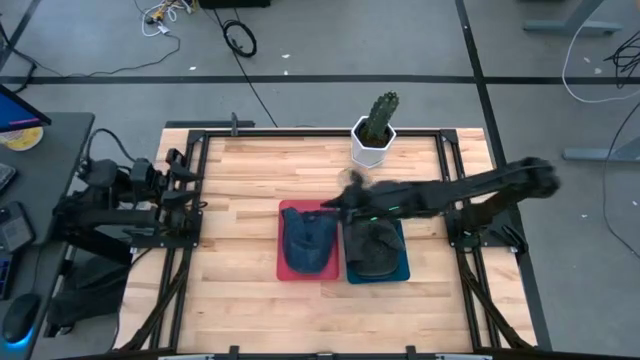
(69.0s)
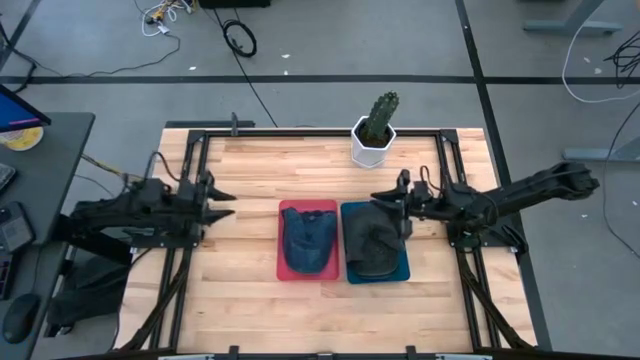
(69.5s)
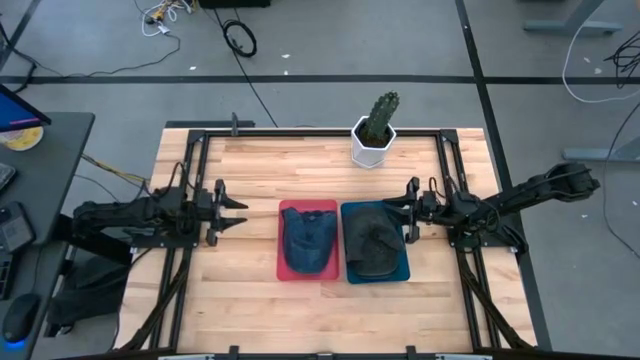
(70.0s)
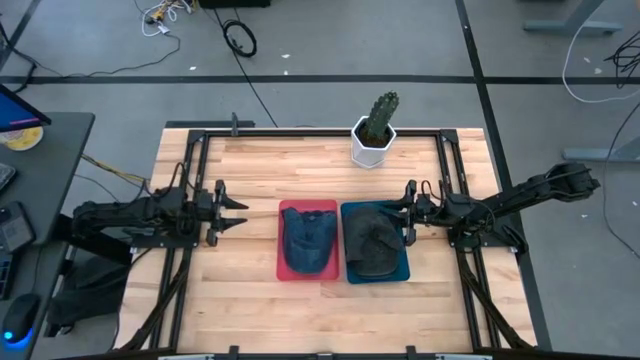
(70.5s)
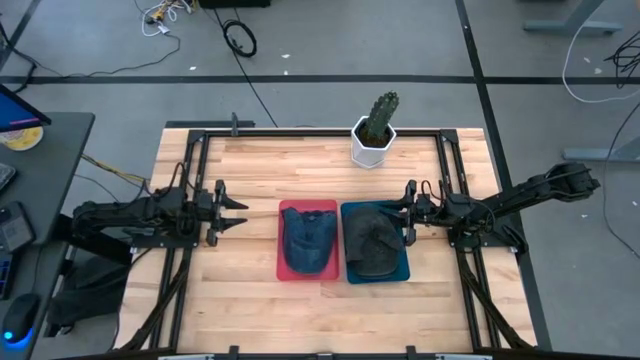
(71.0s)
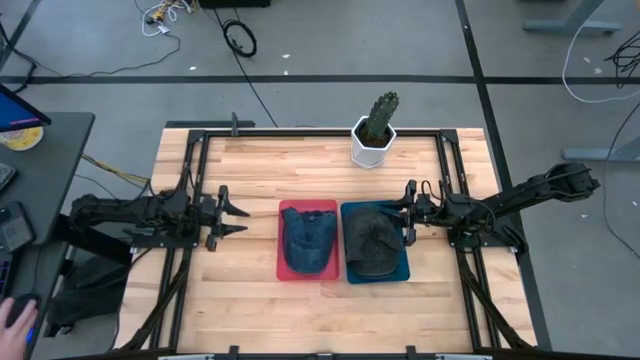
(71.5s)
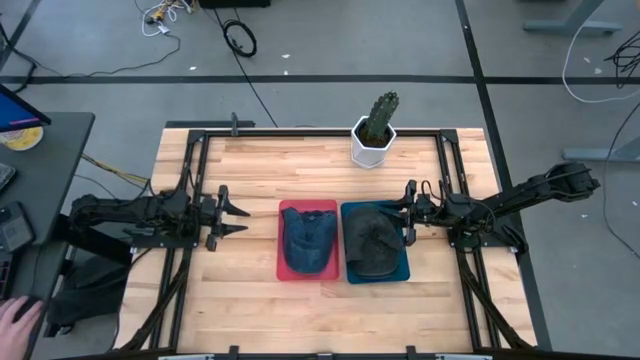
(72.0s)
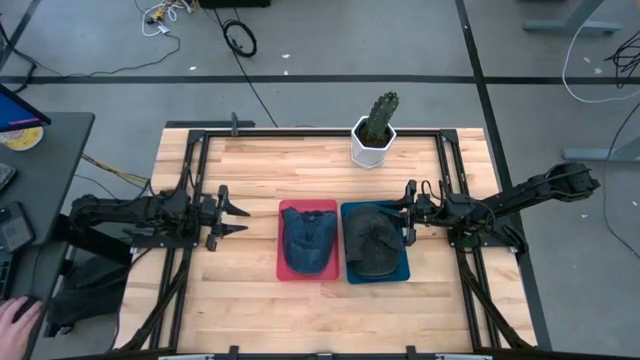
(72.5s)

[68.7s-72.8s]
Task: Pick & Place hat
Return to Home Position

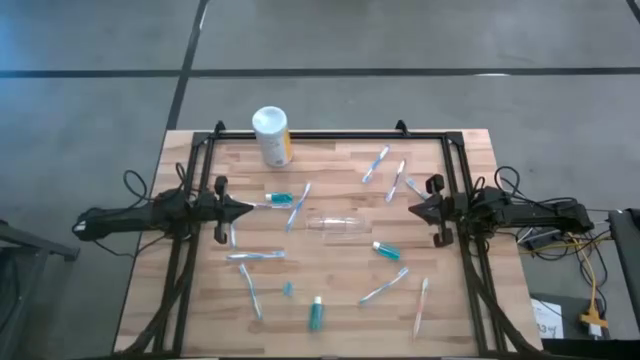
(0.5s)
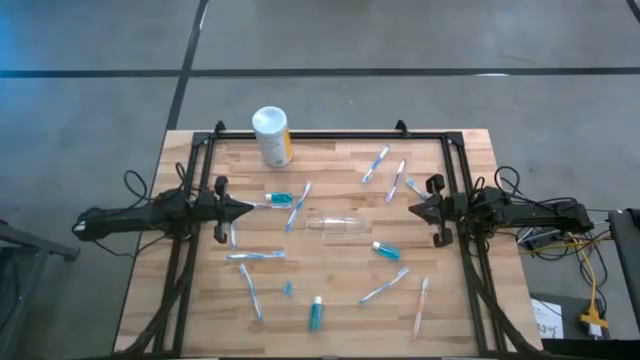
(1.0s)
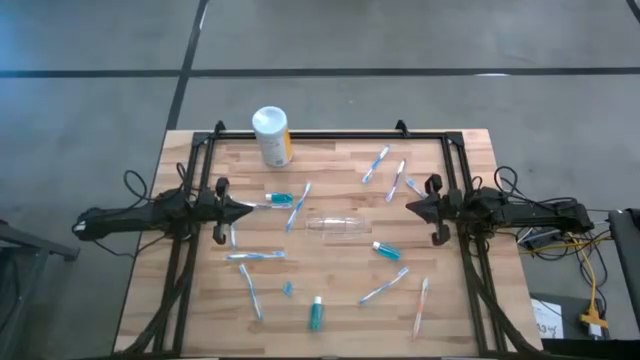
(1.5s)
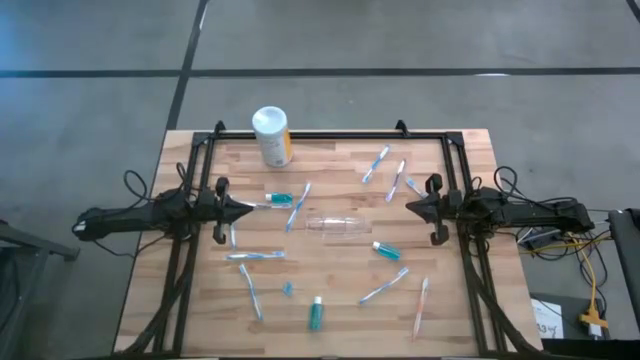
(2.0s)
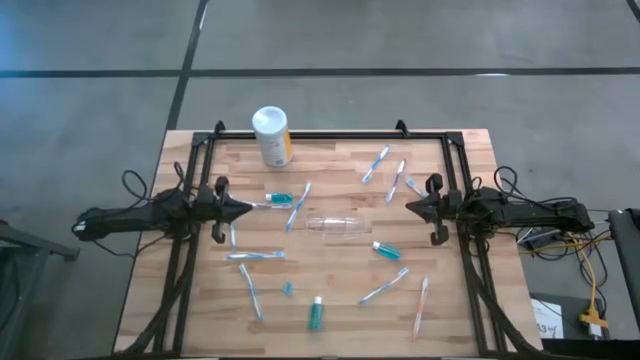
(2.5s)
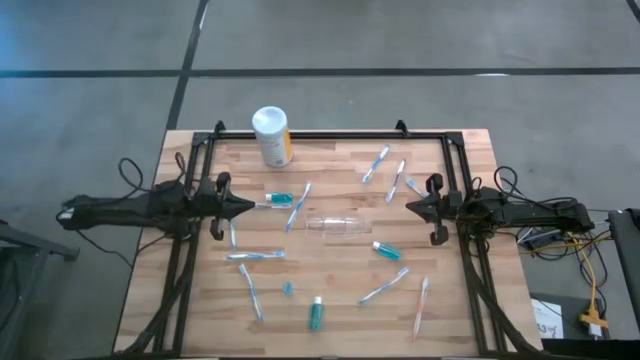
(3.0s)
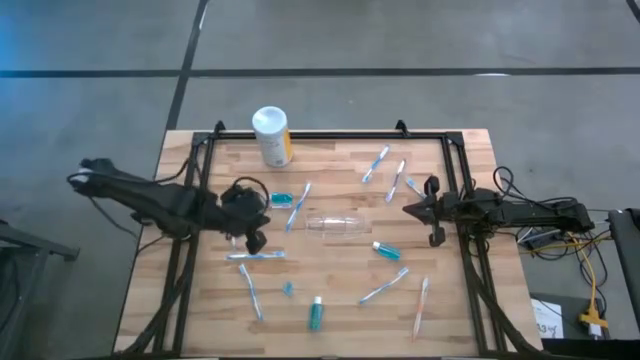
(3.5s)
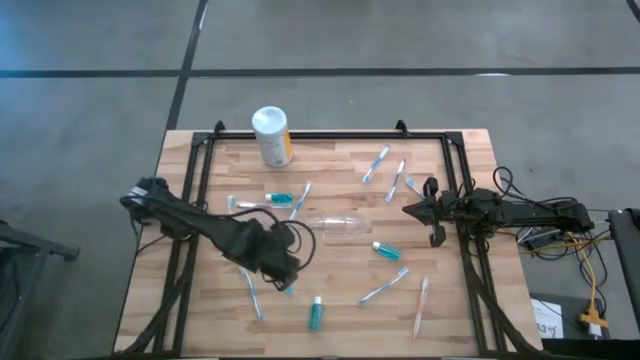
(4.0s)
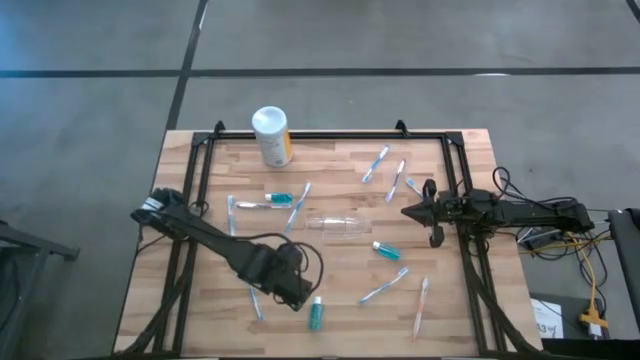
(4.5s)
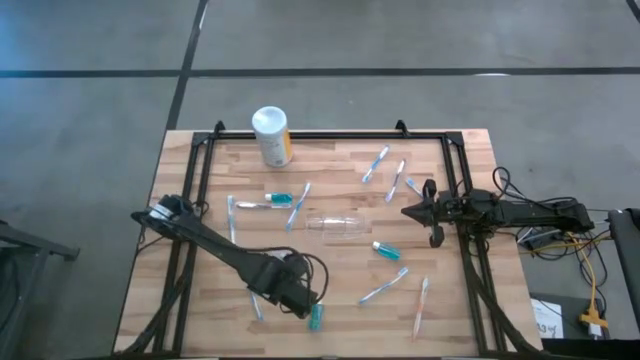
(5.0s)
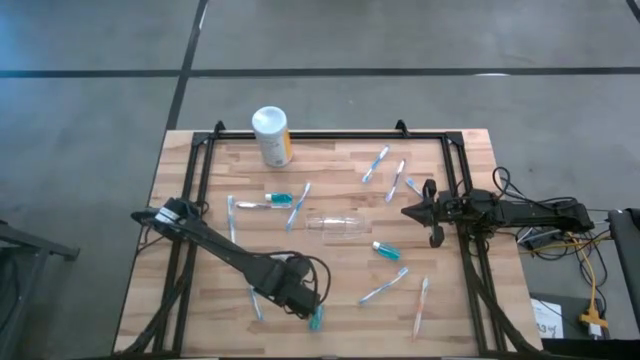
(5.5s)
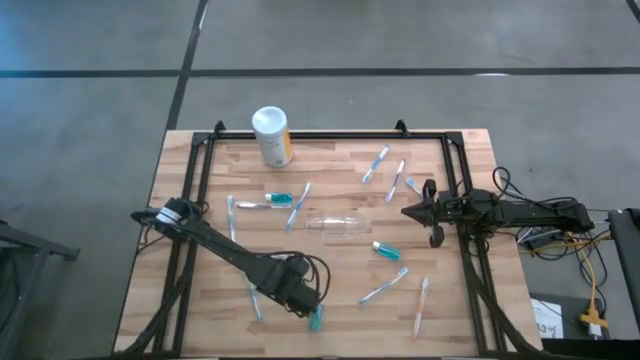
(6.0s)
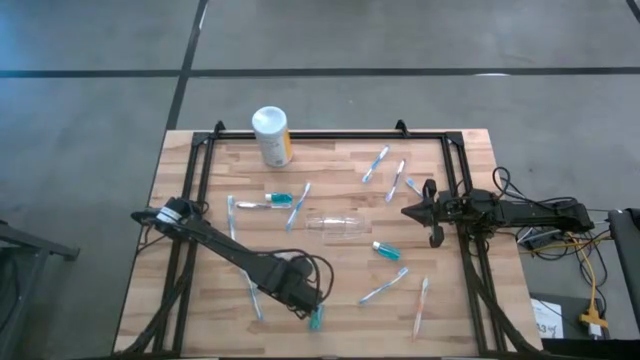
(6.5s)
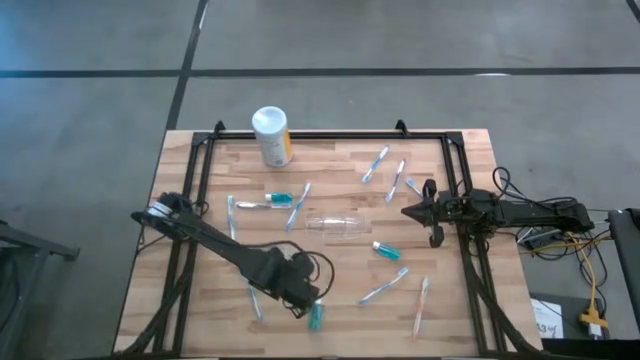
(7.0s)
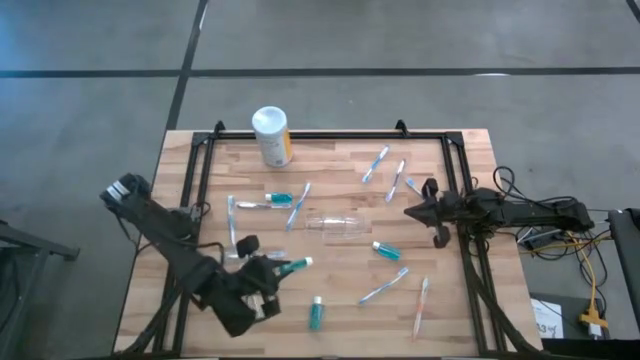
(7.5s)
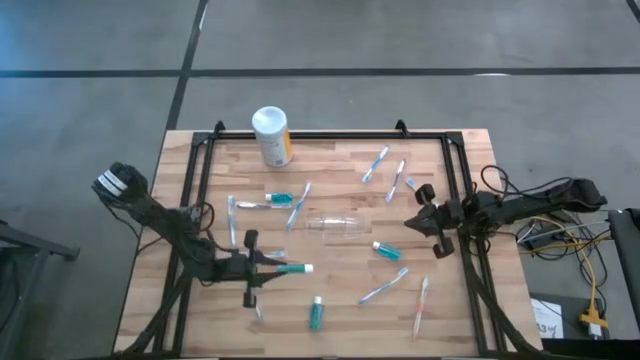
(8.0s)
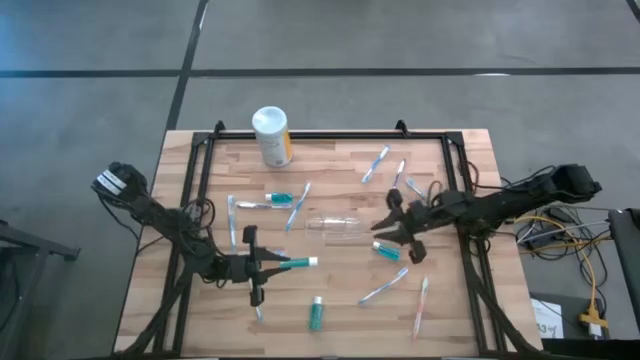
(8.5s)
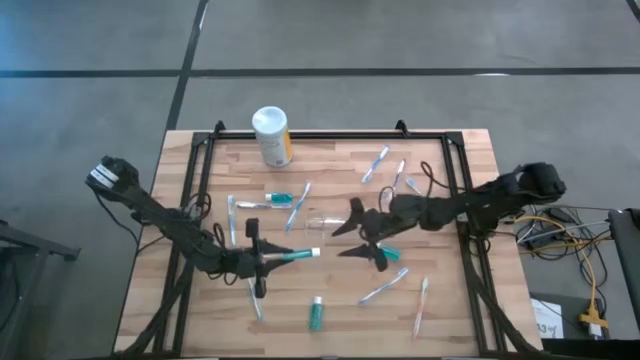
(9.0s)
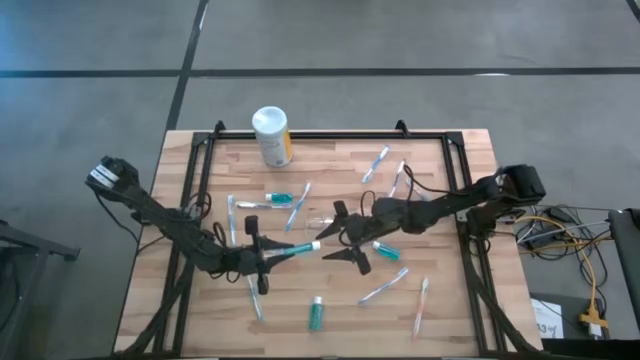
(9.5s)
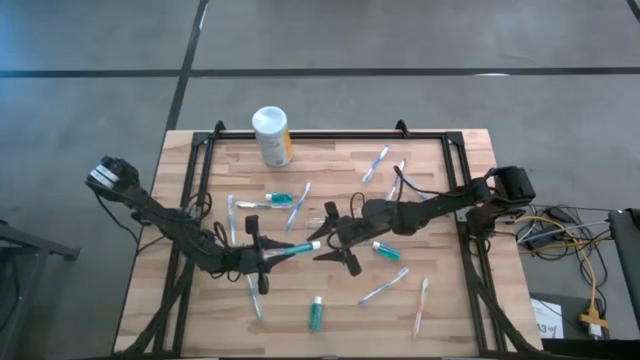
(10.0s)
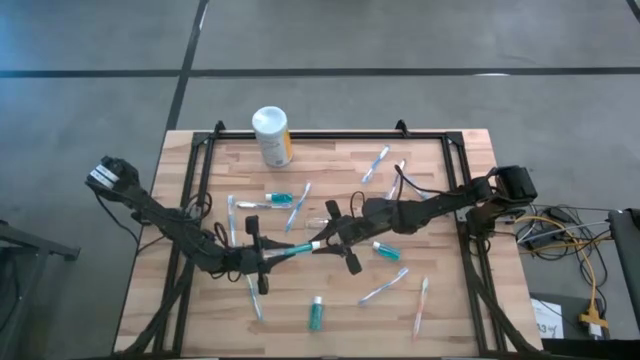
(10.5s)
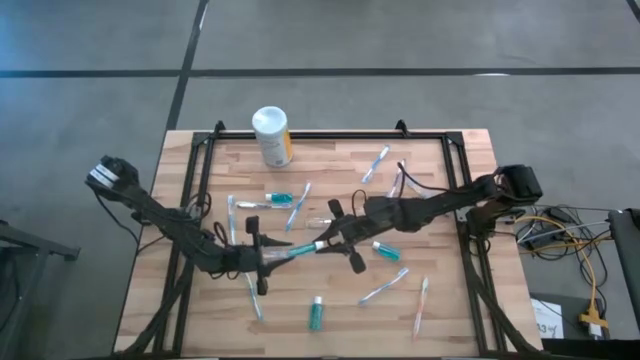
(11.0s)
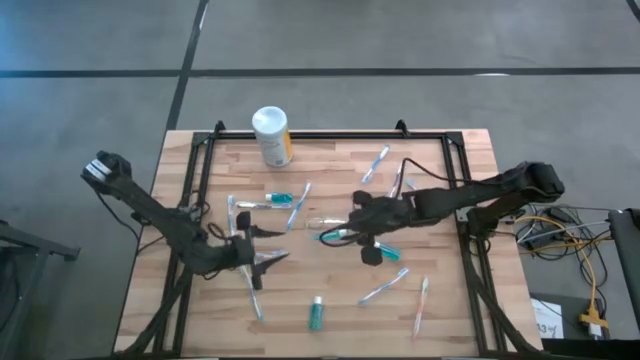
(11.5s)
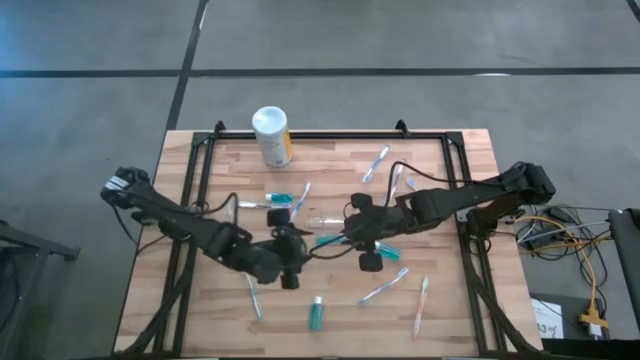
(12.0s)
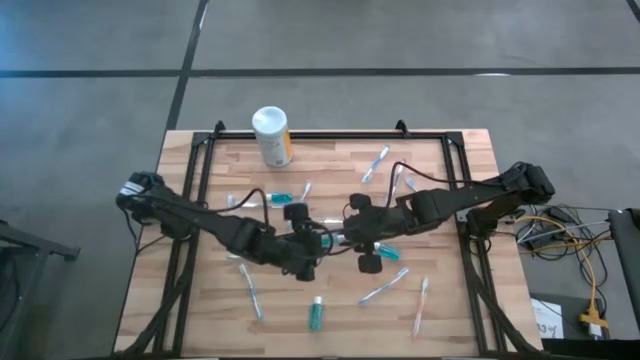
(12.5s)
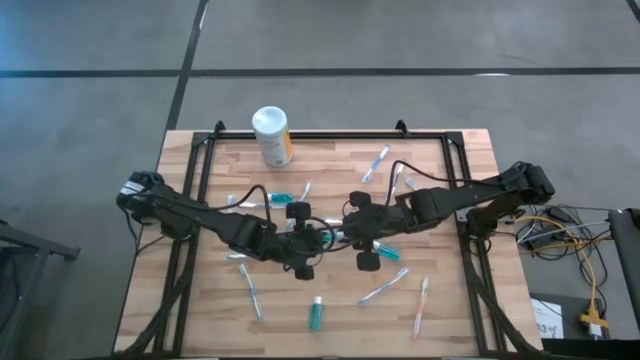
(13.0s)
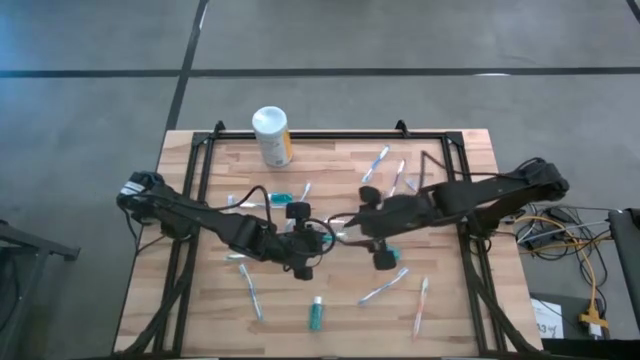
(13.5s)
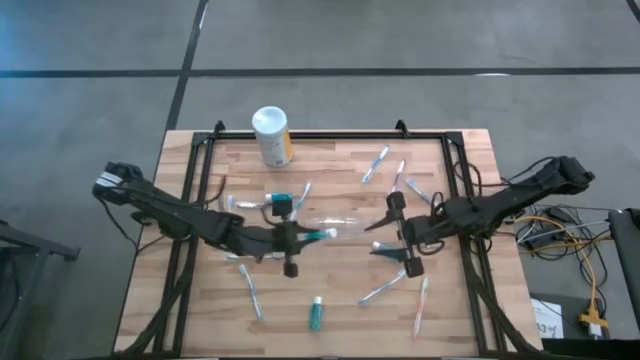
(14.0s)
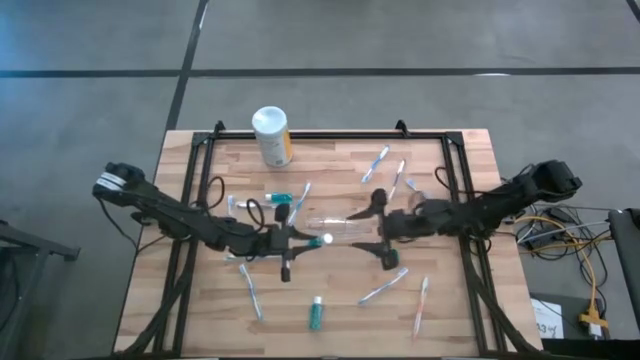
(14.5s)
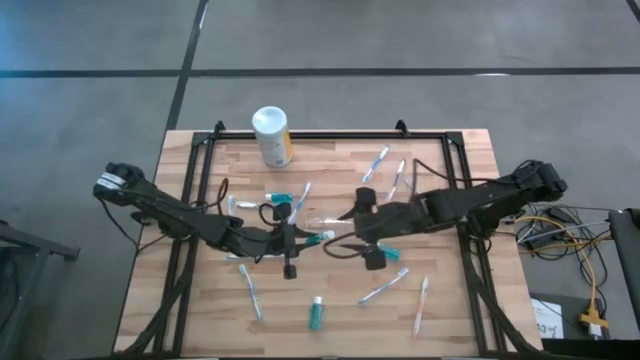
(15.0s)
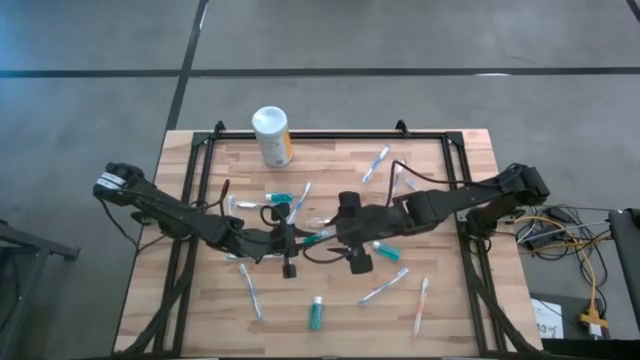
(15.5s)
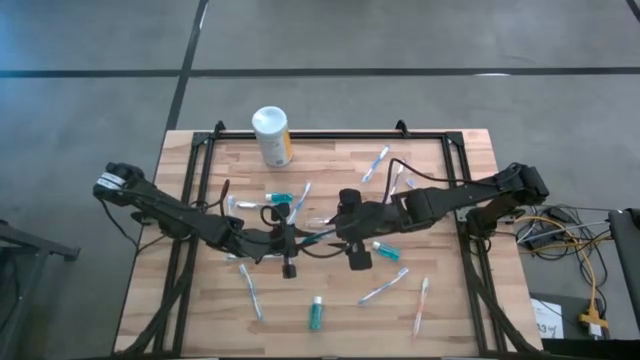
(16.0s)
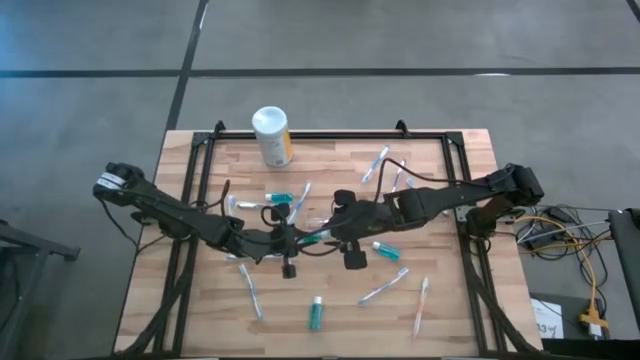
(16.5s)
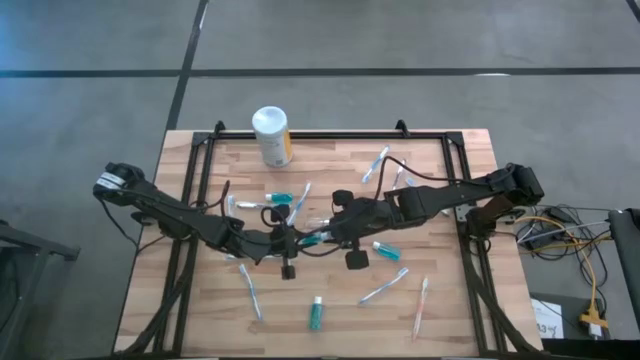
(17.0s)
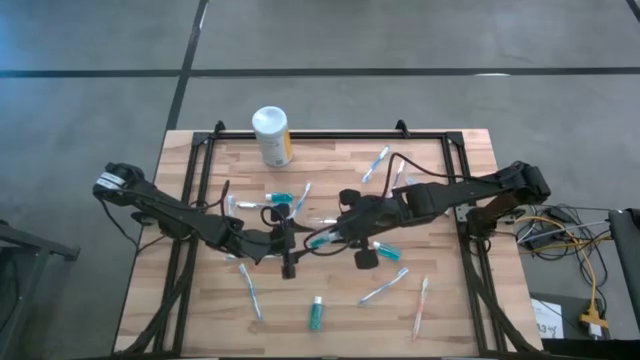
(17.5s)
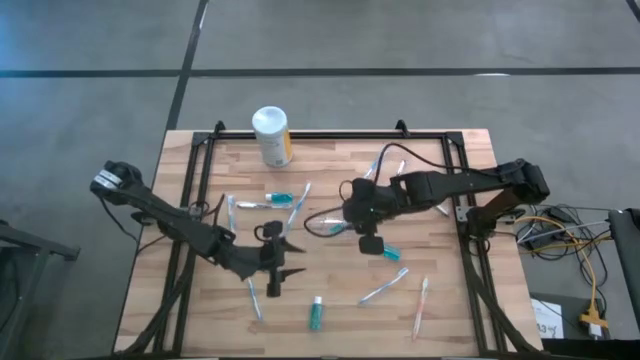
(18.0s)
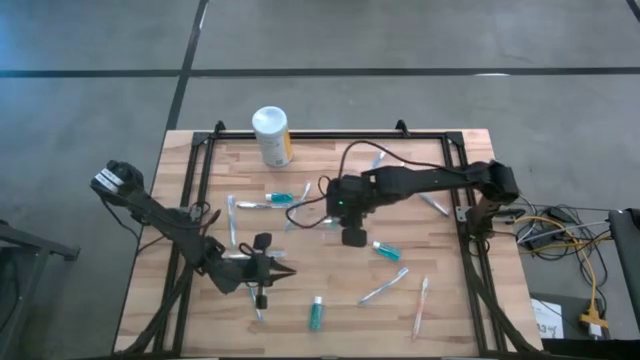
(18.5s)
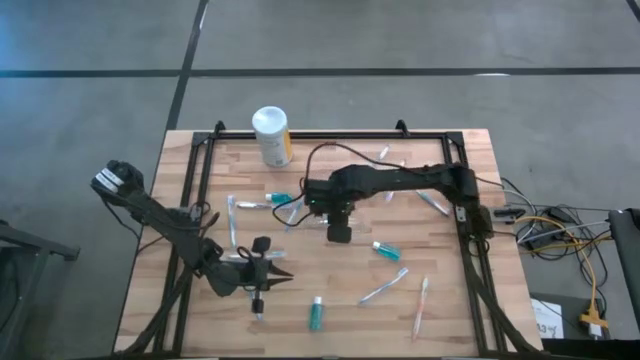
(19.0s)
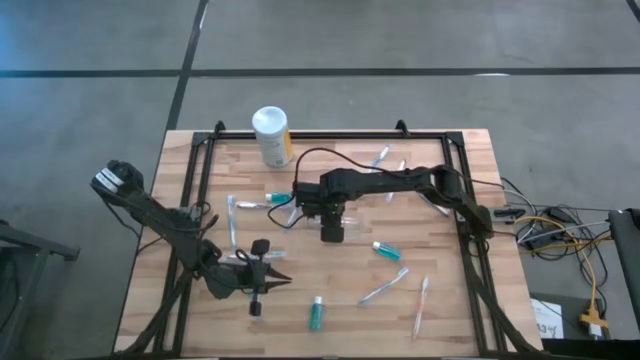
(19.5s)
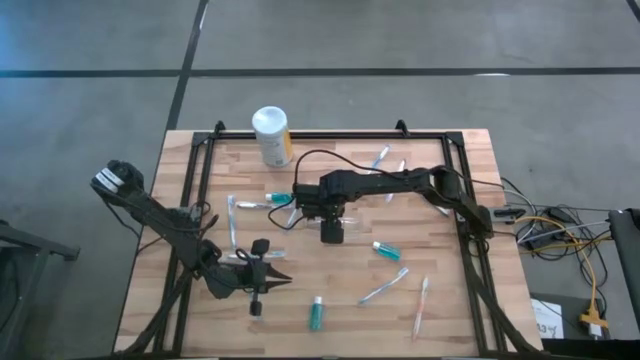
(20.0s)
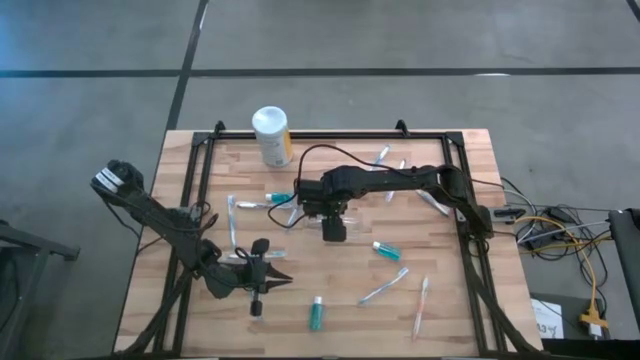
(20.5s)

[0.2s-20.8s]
Task: Pick & Place toothbrushing station
Put the mouthwash into the transparent organizer
